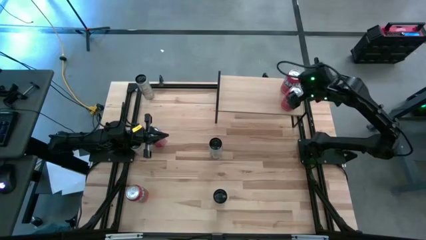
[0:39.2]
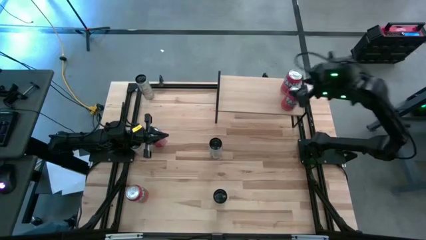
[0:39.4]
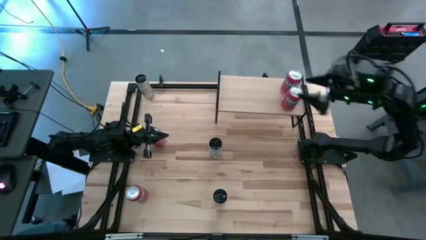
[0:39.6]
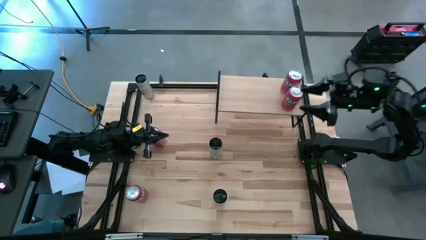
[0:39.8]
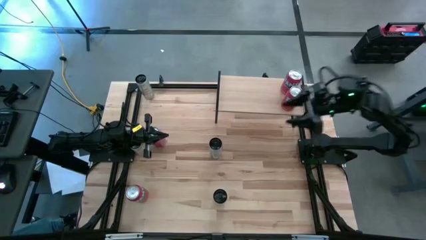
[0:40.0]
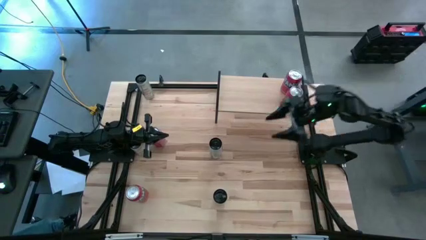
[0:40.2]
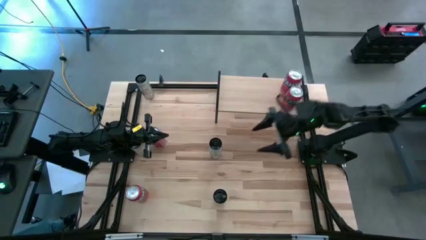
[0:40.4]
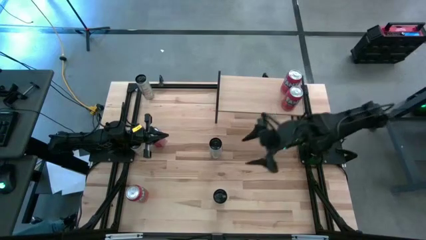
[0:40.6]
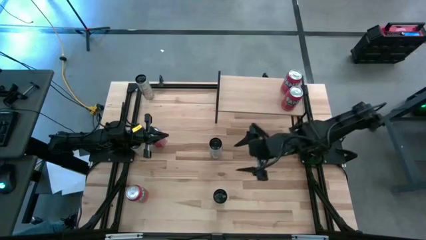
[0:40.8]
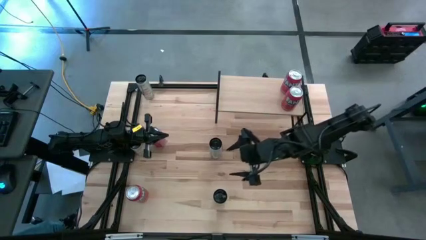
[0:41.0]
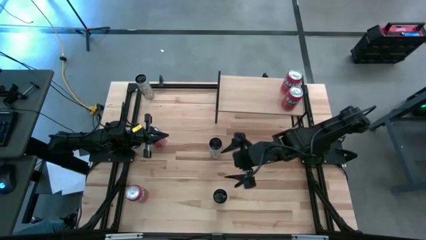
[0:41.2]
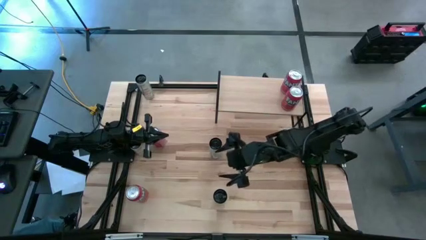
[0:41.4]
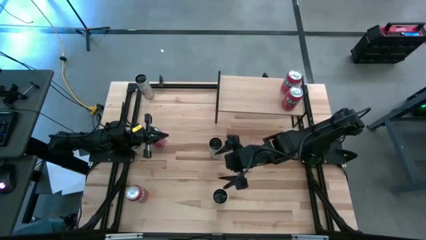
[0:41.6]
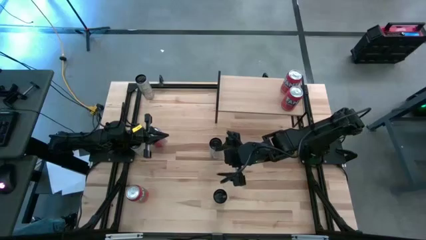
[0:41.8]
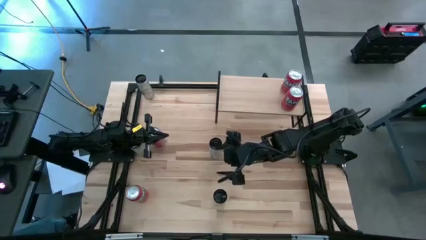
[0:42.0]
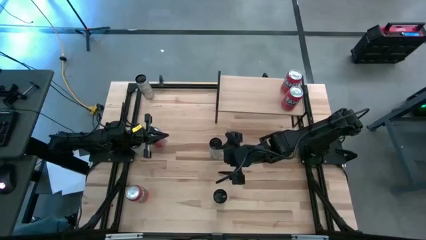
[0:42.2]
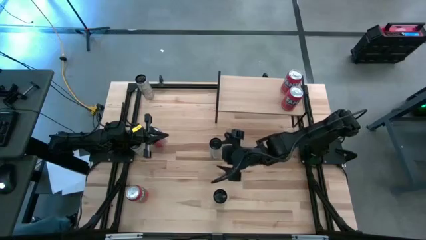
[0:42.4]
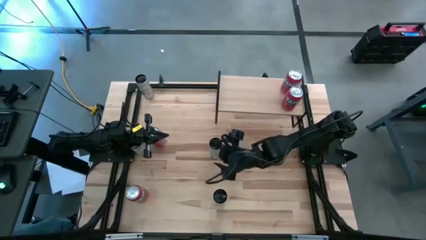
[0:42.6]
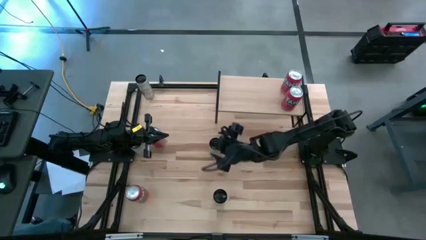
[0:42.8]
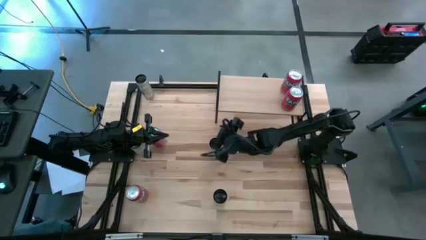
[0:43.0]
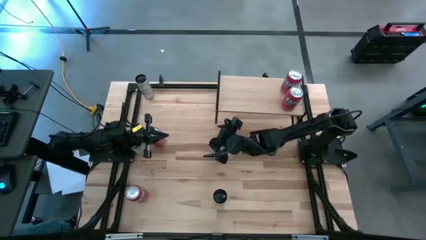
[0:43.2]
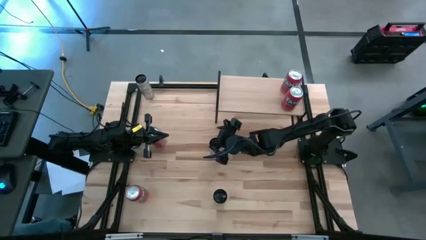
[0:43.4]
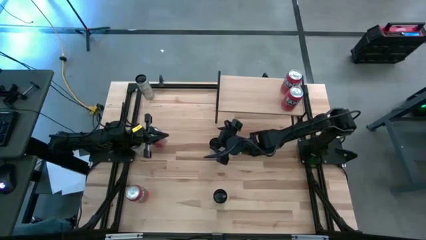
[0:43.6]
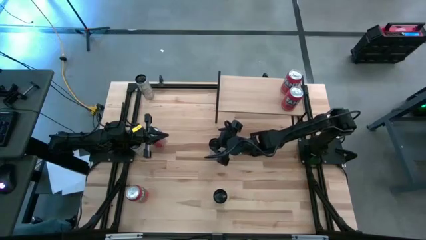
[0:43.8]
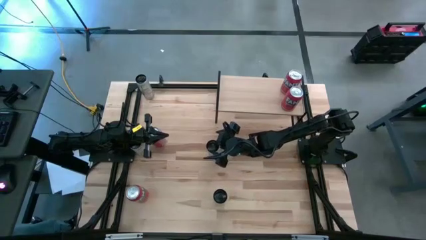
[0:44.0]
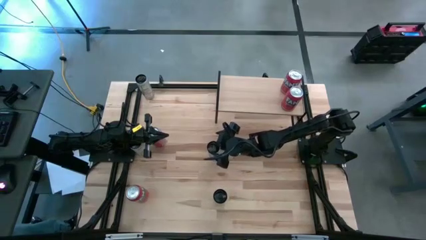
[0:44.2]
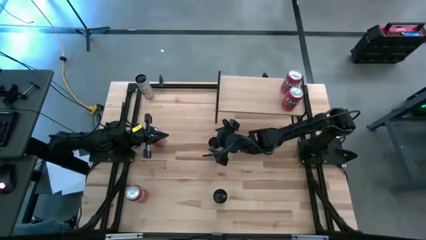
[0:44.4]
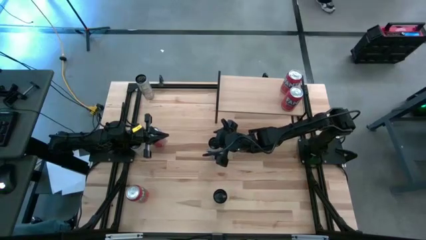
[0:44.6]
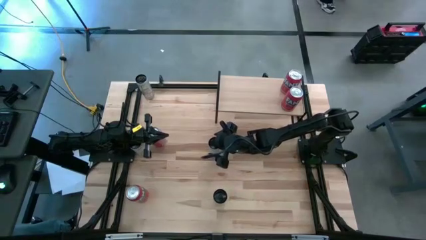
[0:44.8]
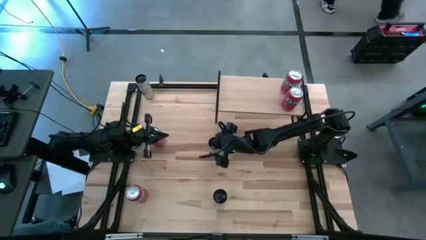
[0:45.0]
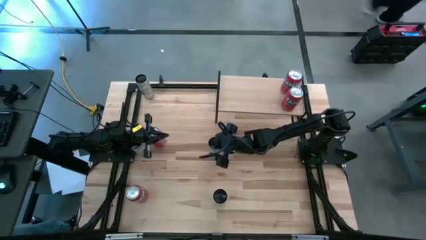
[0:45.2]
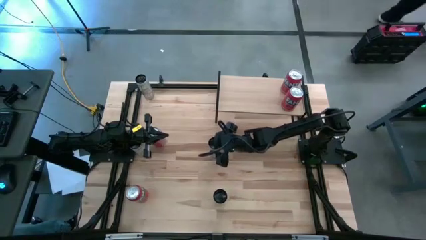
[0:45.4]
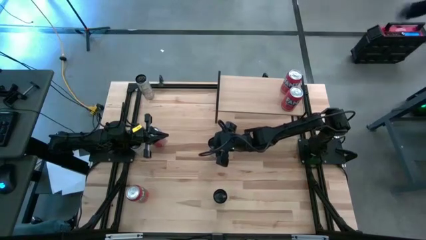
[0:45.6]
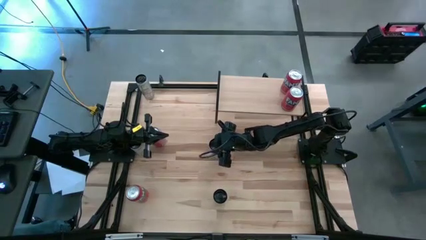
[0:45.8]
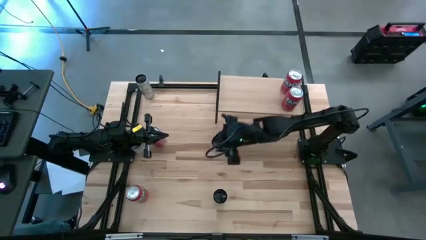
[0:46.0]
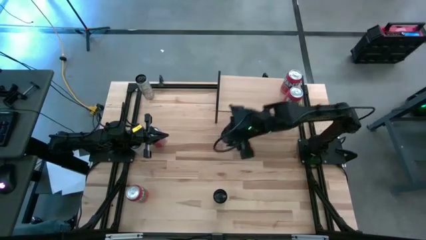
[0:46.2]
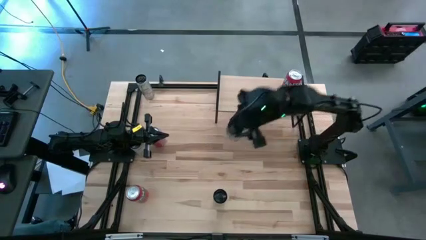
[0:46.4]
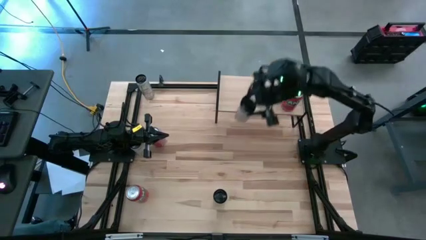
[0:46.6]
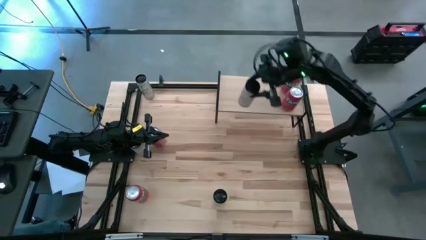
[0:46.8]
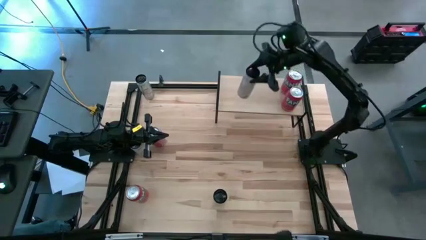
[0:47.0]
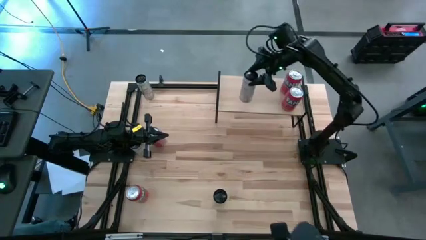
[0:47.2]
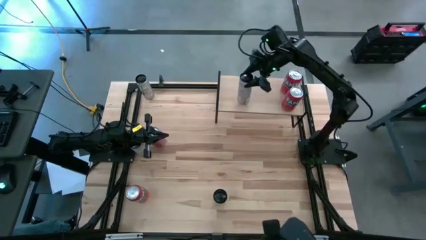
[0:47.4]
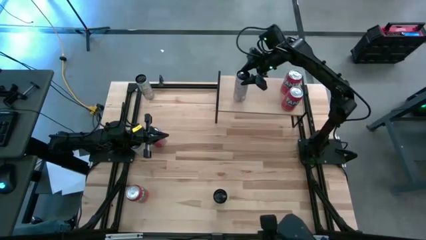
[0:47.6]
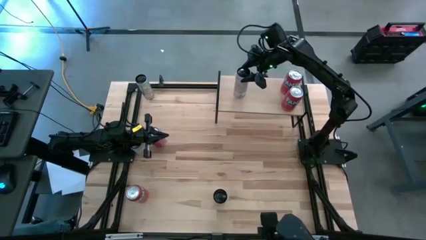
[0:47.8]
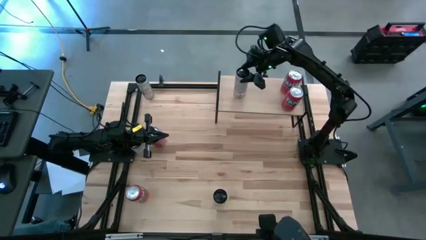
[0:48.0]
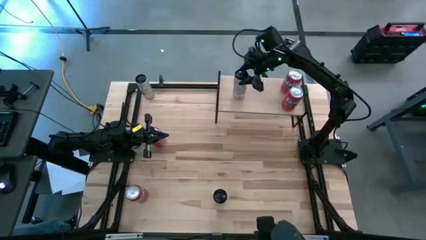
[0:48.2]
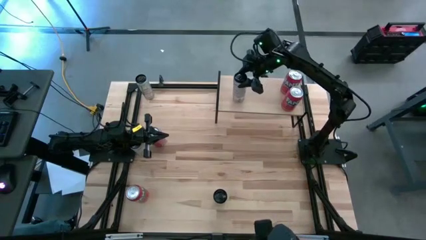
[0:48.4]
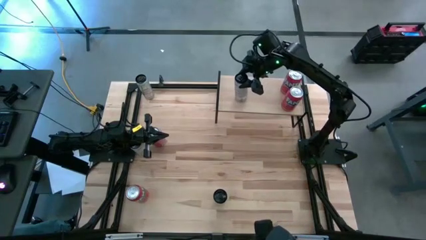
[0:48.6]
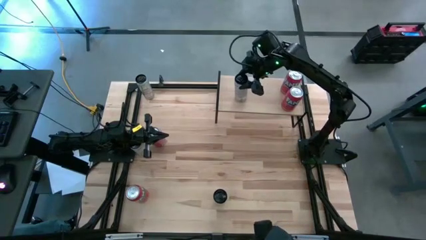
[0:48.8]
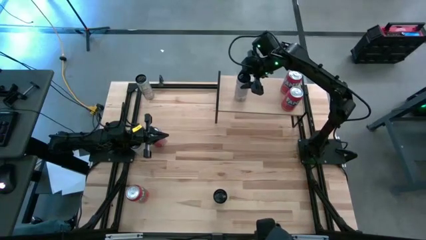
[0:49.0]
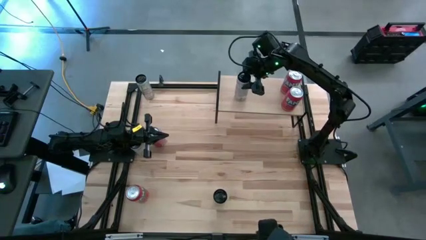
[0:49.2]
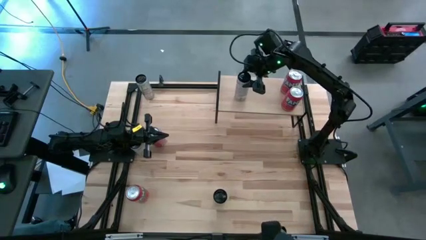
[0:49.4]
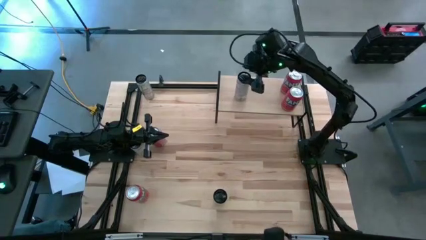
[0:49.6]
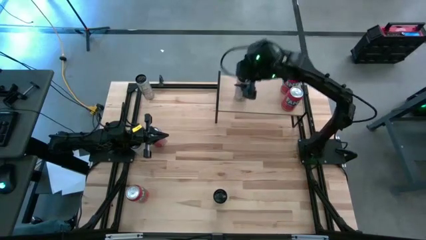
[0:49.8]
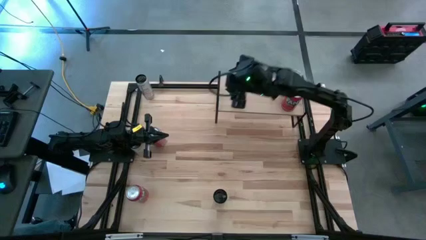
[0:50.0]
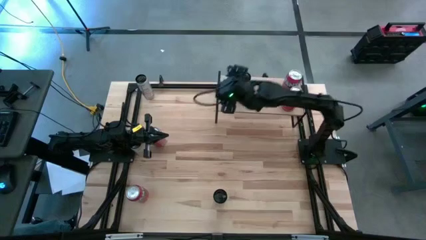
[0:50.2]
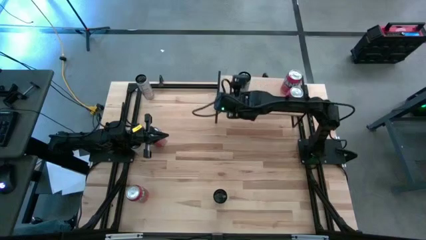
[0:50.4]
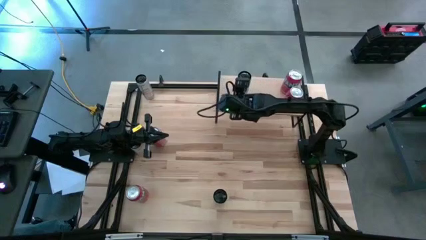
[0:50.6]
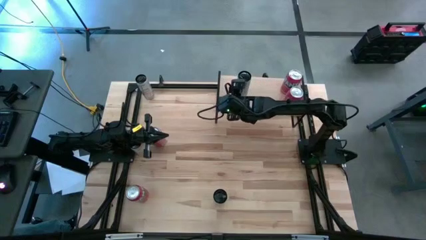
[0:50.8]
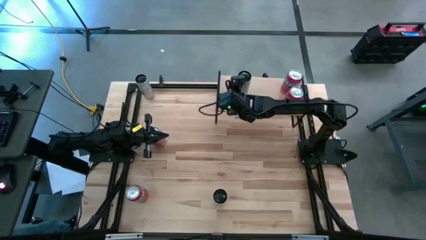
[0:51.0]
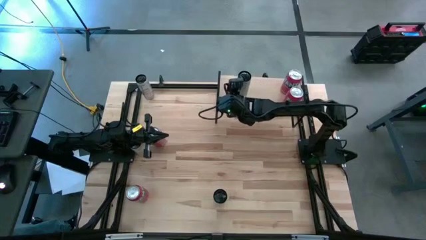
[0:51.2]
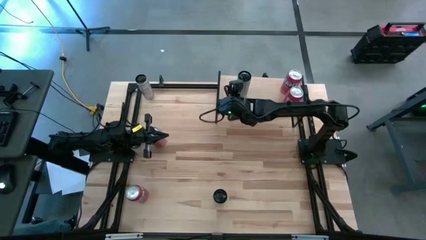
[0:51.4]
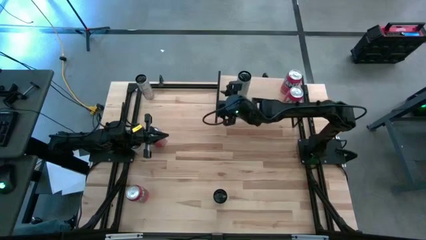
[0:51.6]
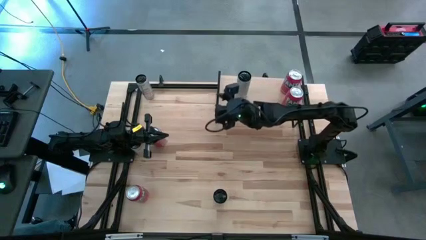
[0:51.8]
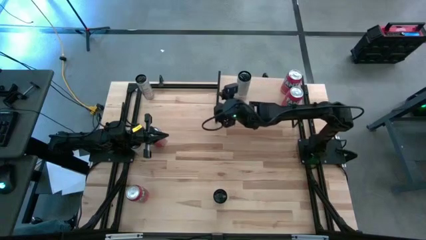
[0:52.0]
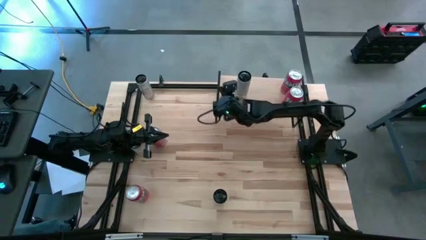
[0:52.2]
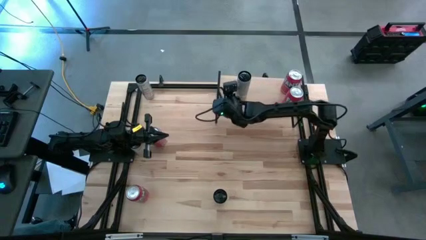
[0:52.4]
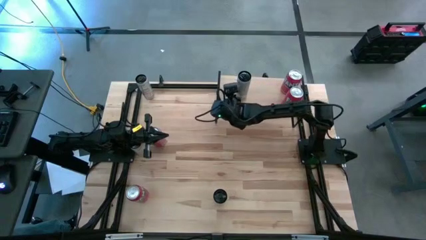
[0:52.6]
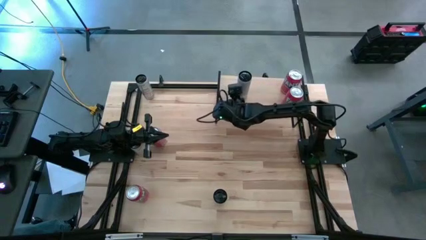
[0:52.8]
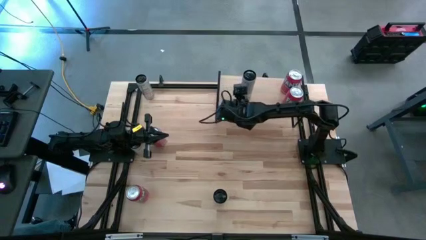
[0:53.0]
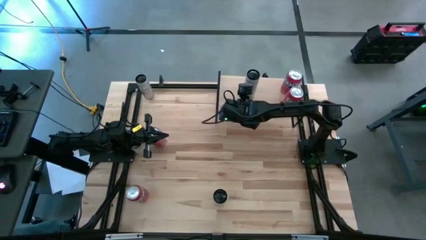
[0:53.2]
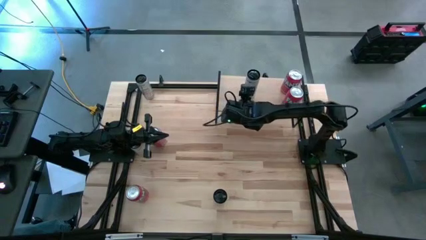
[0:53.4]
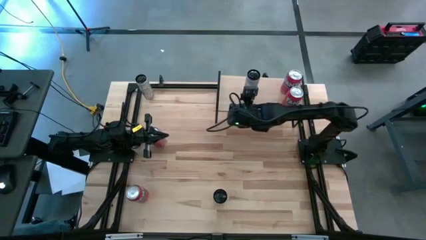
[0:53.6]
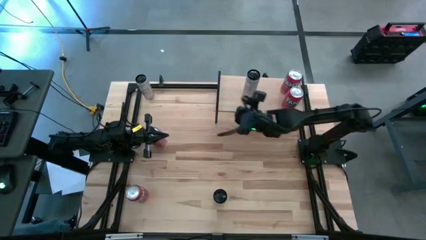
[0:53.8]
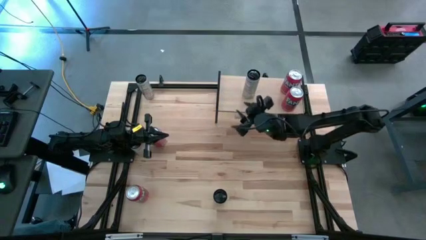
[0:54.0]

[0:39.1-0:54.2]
Task: Place canned beverage on shelf
Put the white soda can on the shelf
